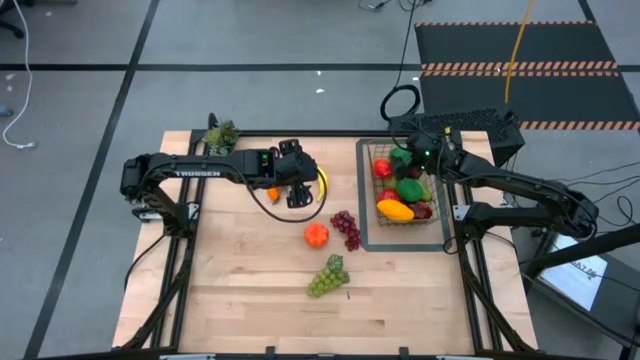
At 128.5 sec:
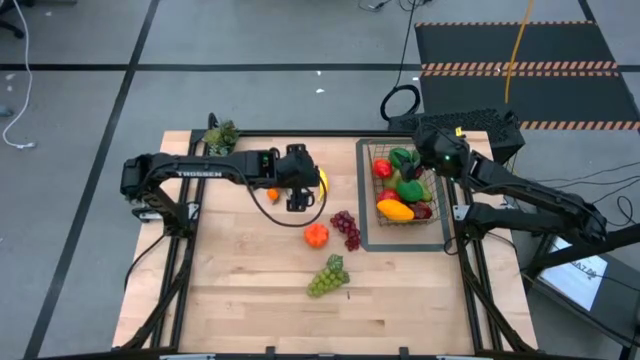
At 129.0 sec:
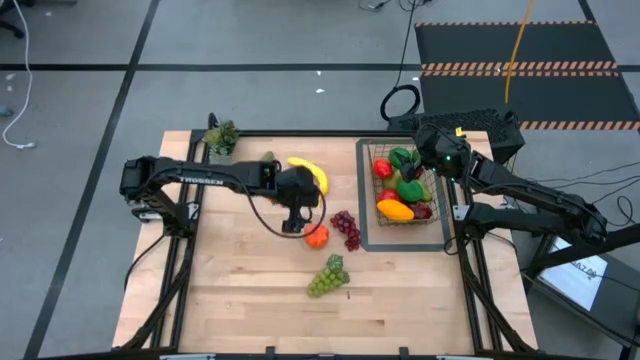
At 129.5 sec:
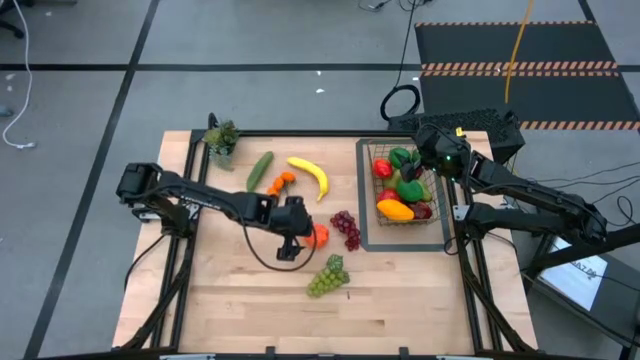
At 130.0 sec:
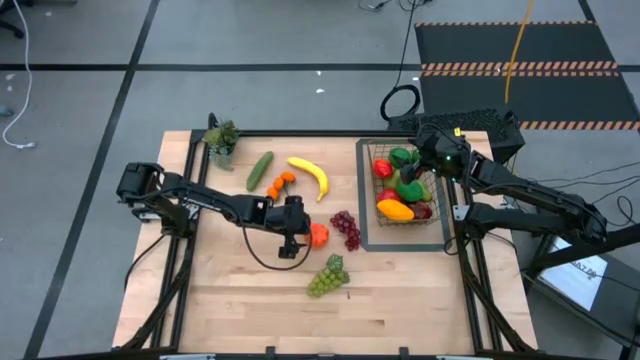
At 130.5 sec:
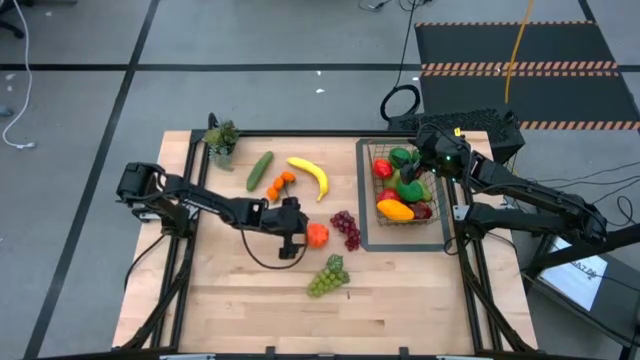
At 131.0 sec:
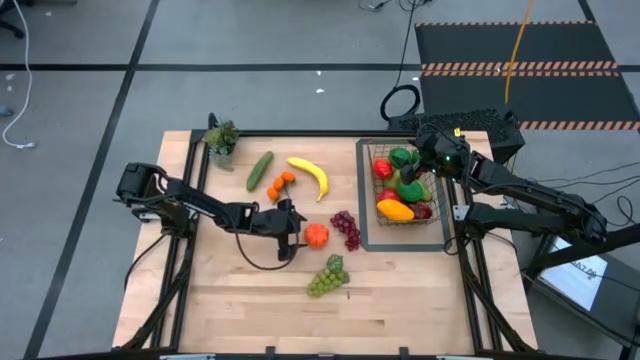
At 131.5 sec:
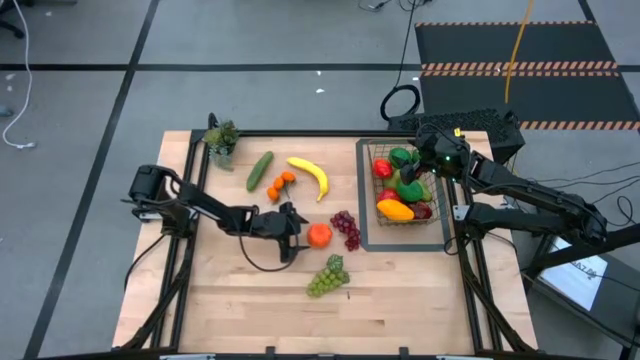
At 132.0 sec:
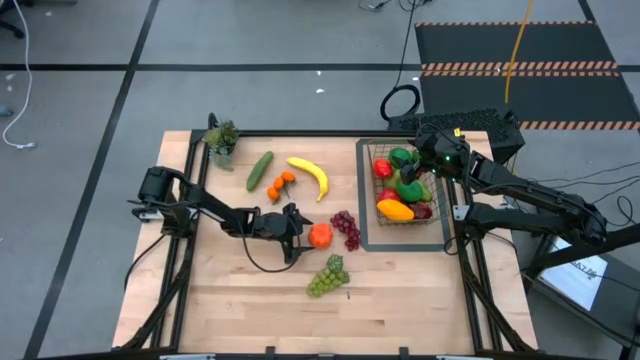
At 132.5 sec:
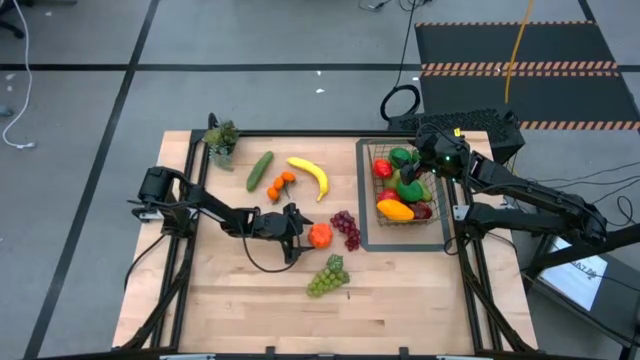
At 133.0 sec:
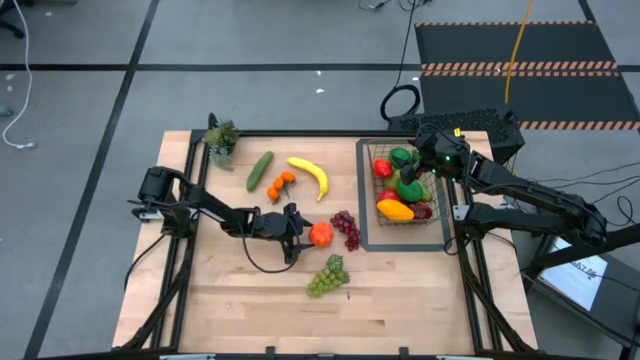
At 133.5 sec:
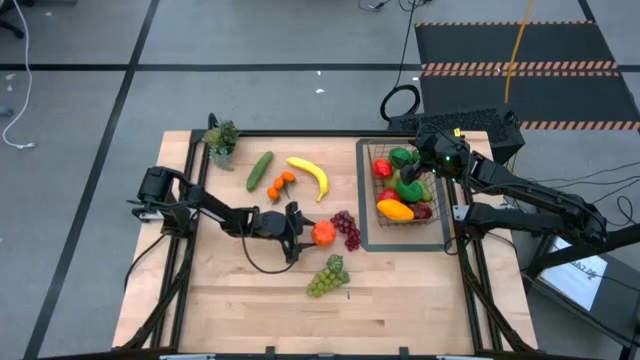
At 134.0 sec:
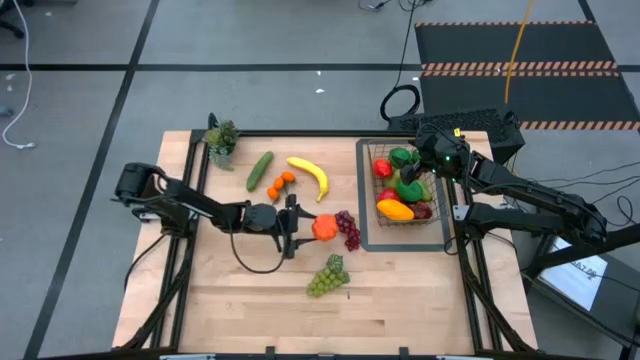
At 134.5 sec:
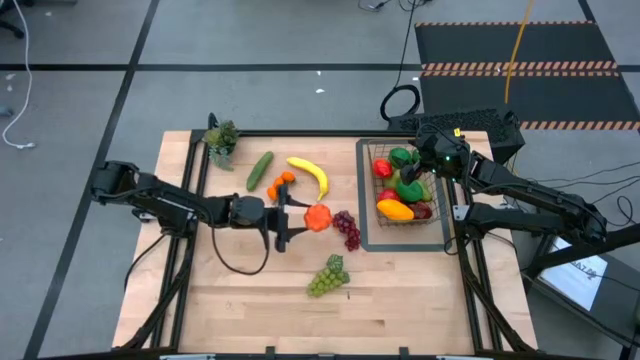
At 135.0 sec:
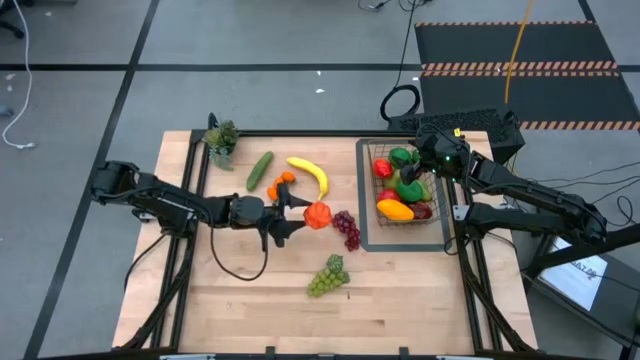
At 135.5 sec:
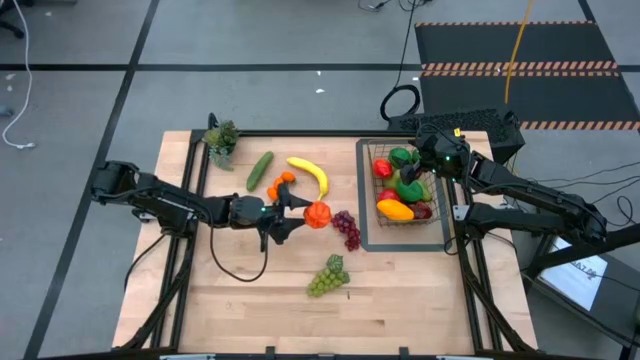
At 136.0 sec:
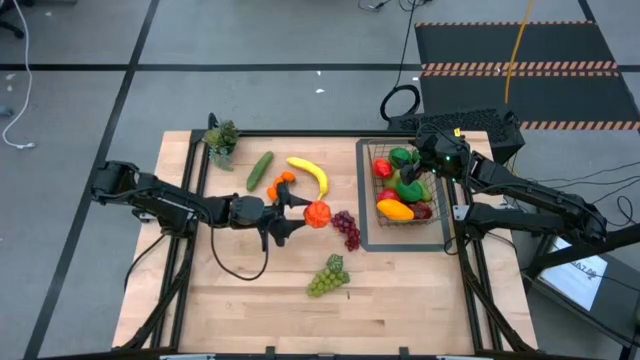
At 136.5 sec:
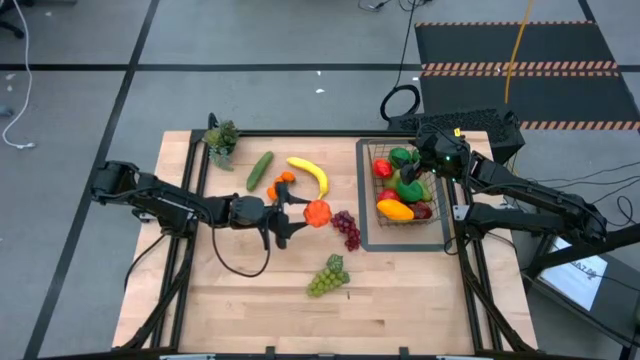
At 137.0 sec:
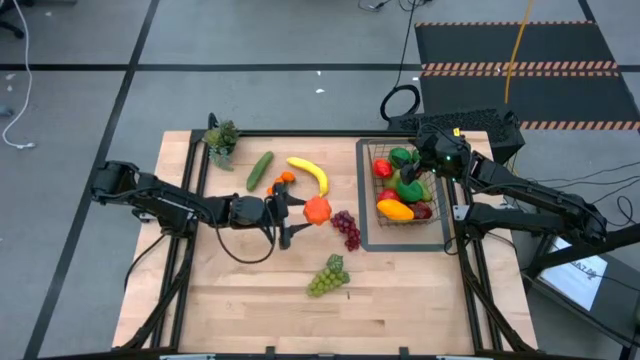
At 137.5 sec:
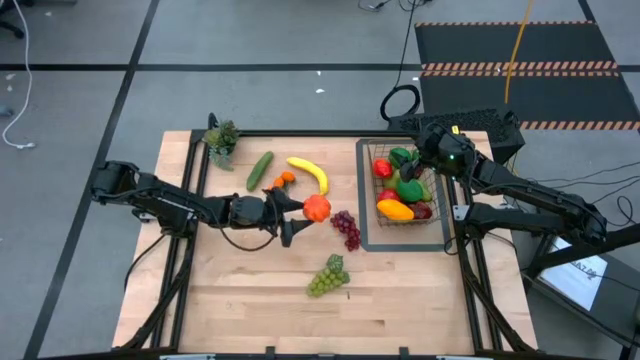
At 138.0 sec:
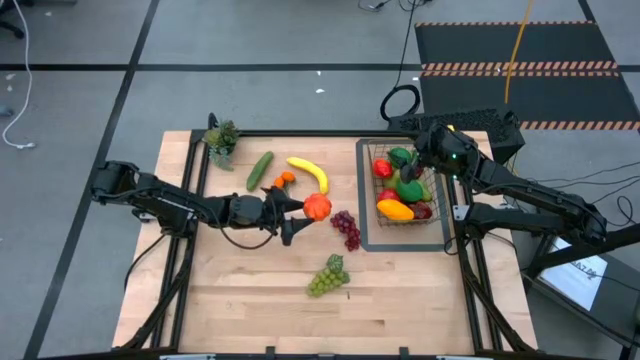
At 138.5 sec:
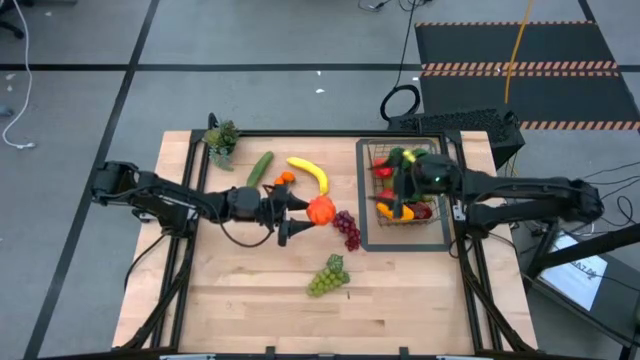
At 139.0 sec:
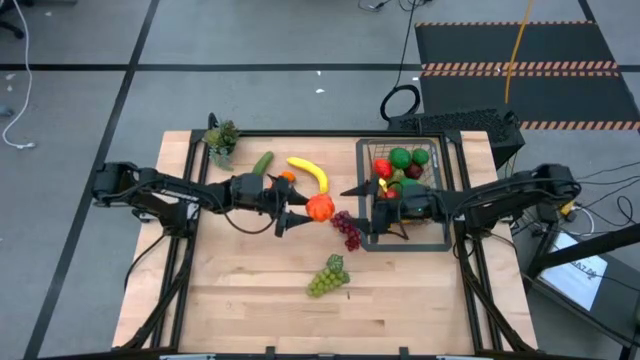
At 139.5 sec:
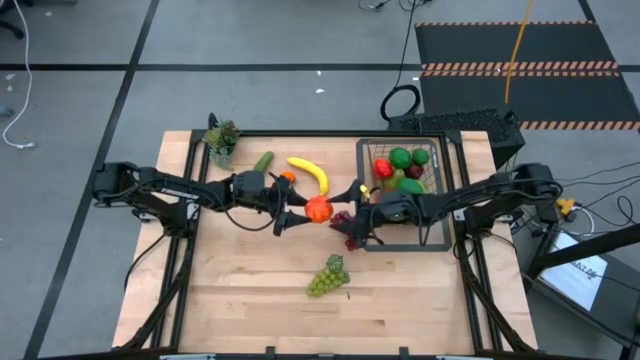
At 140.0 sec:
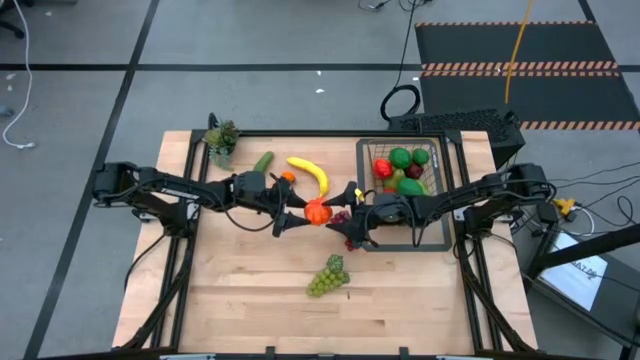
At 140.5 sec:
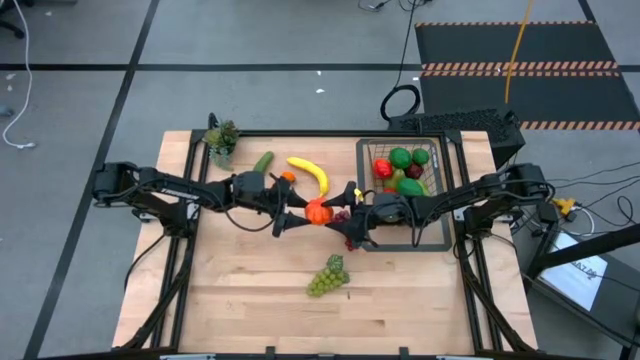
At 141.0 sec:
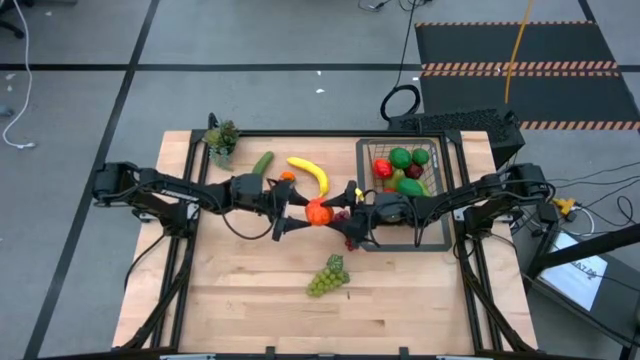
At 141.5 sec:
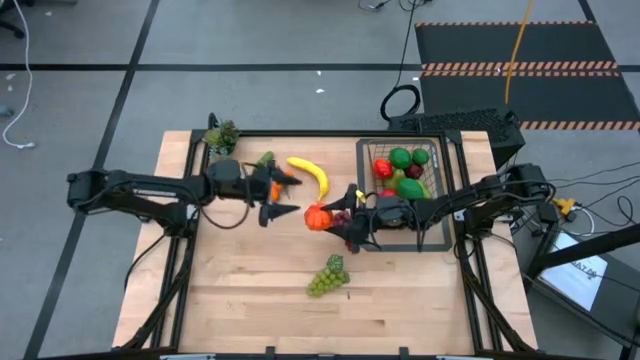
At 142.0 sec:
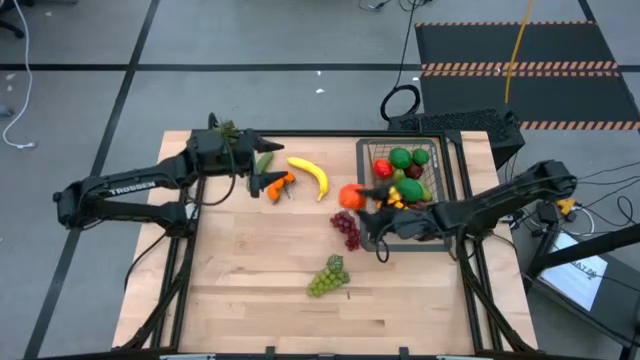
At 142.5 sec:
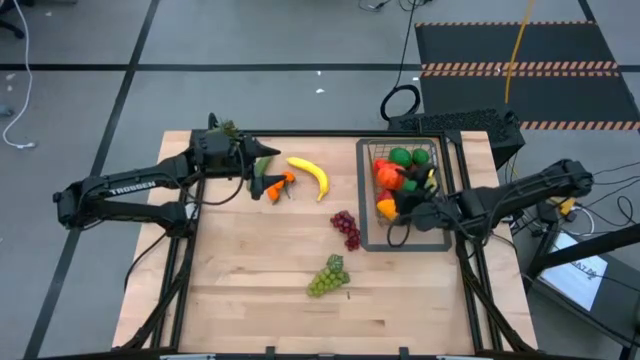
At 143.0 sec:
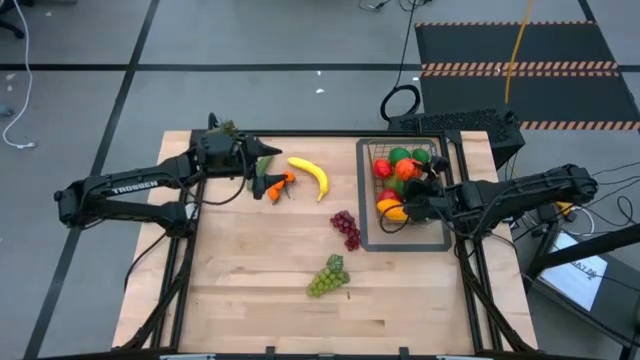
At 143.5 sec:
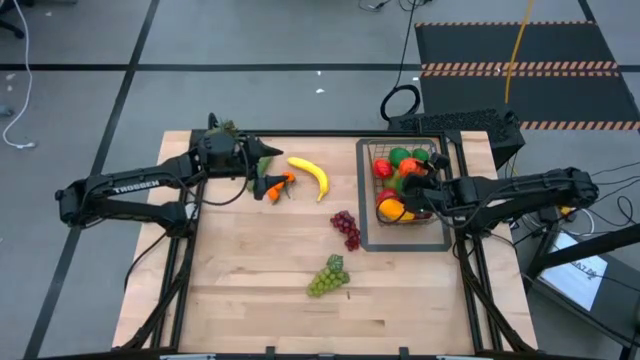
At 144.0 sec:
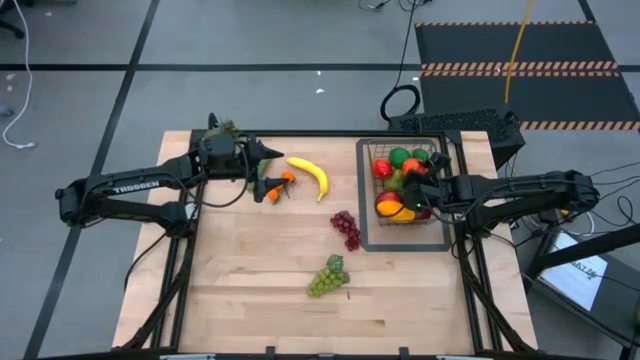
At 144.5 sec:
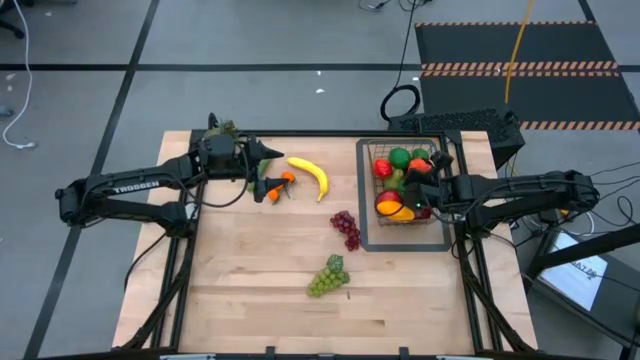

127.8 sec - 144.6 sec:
Task: Build produce basket
Put the pumpkin into the gold wire basket

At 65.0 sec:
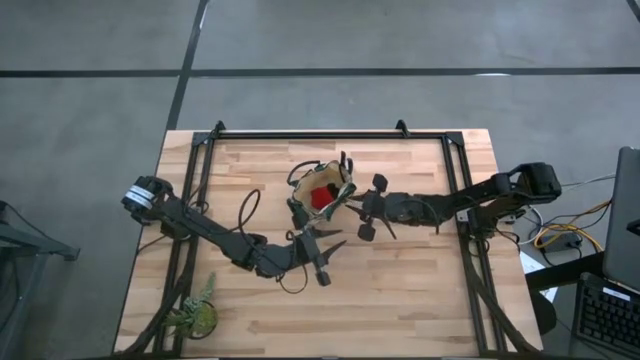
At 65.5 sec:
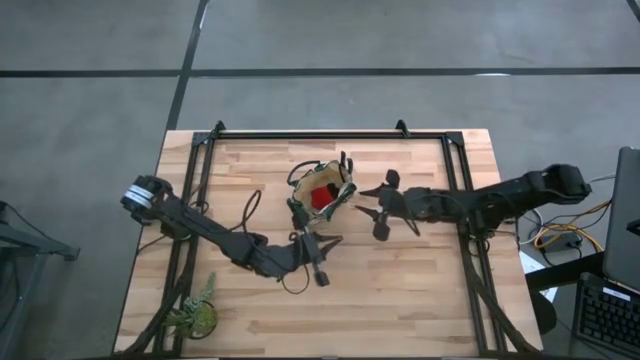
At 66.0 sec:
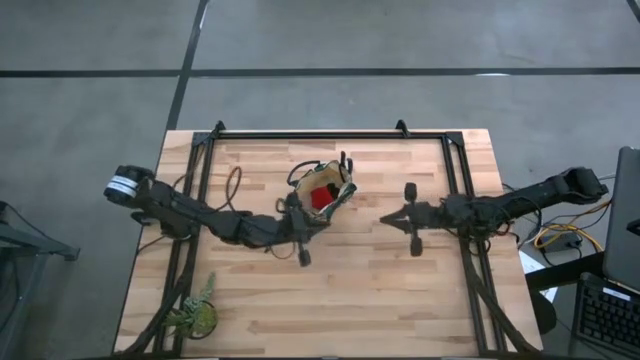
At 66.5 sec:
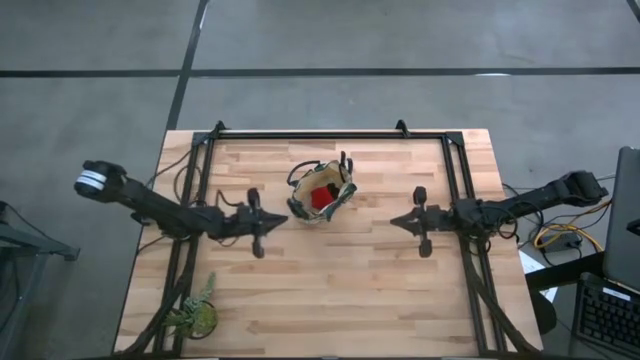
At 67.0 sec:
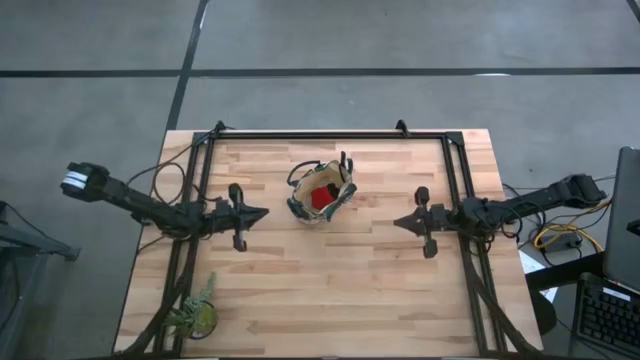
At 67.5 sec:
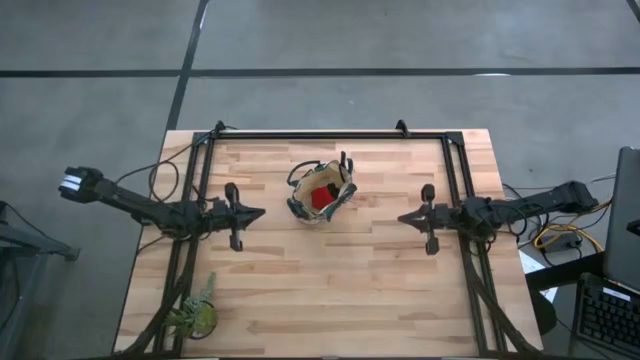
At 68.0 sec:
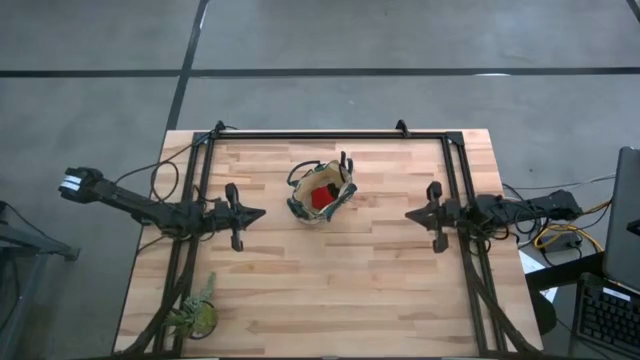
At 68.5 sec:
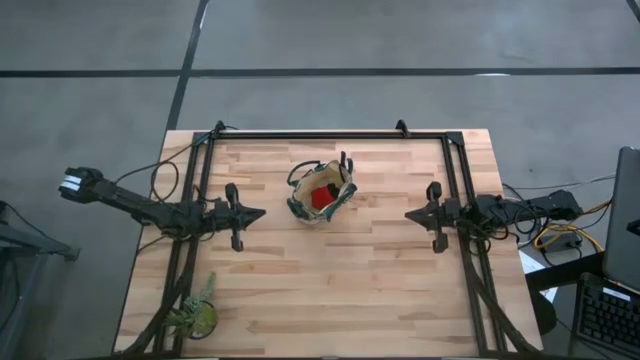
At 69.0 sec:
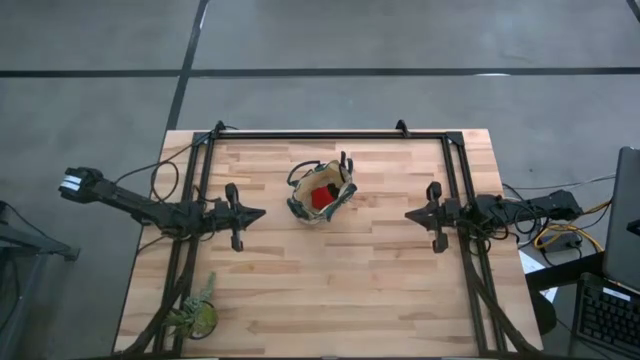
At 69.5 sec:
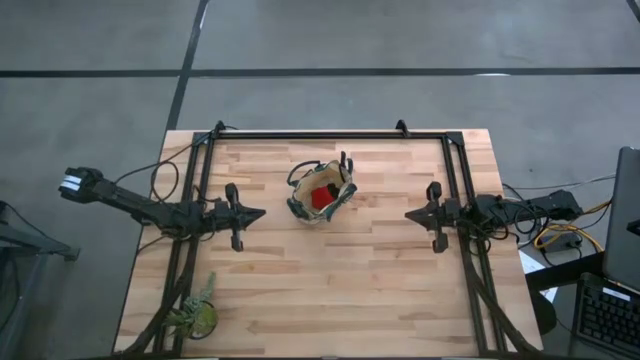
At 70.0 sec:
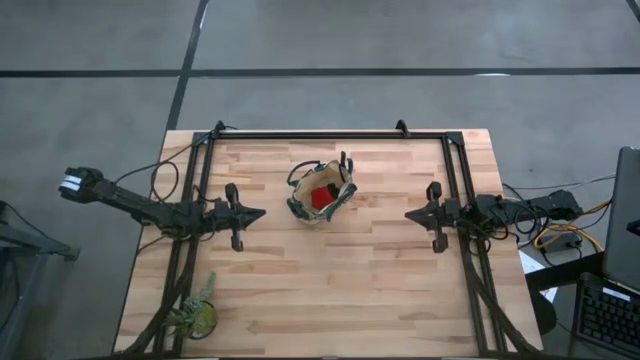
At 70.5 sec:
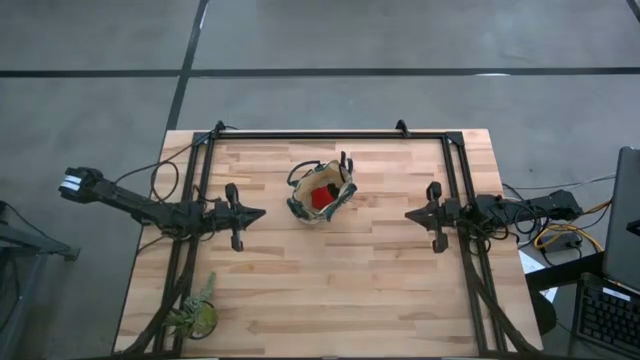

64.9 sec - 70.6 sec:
Task: Pick & Place Garden tools in Gardening bag
Return to Home Position
